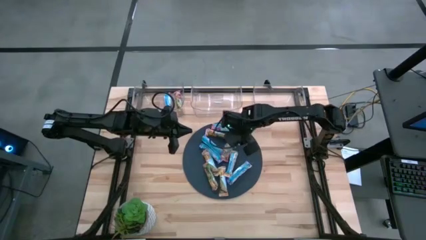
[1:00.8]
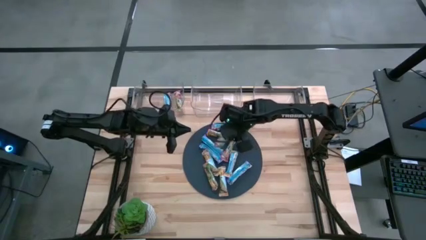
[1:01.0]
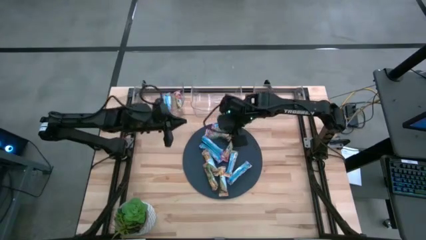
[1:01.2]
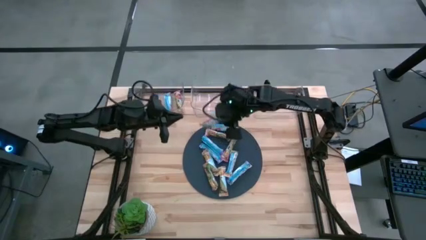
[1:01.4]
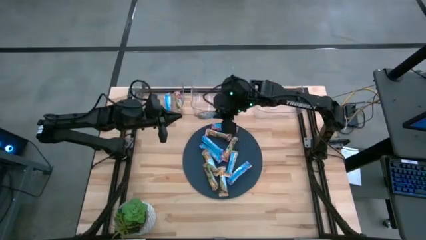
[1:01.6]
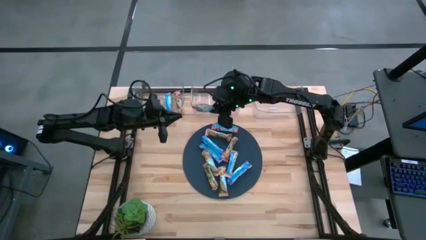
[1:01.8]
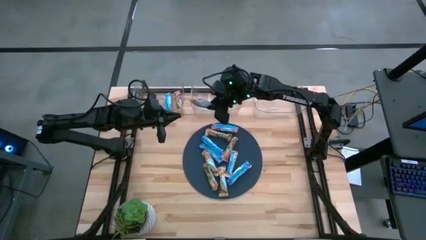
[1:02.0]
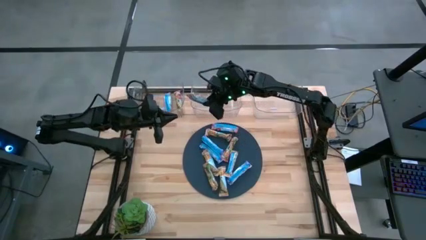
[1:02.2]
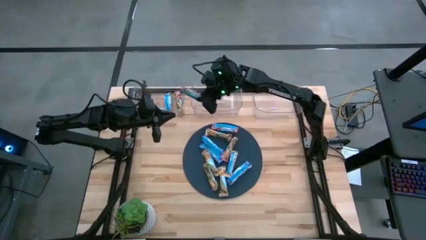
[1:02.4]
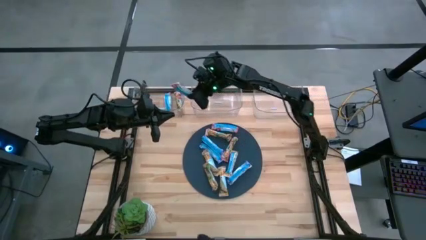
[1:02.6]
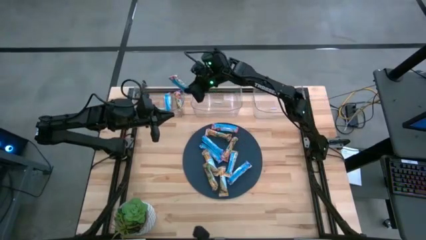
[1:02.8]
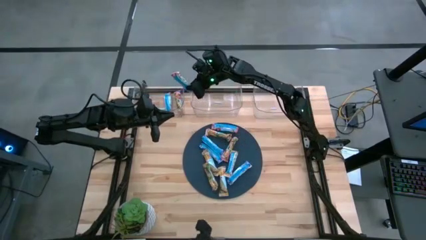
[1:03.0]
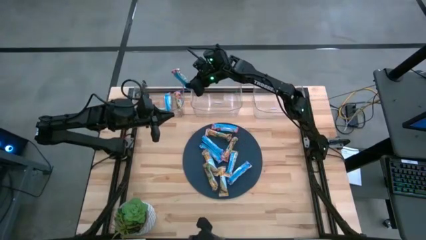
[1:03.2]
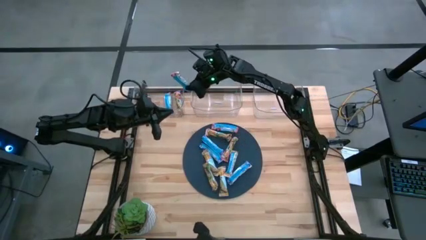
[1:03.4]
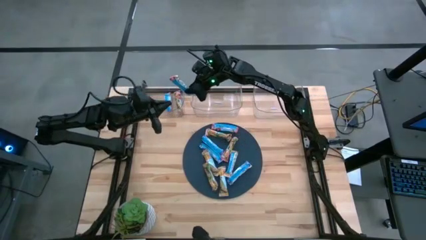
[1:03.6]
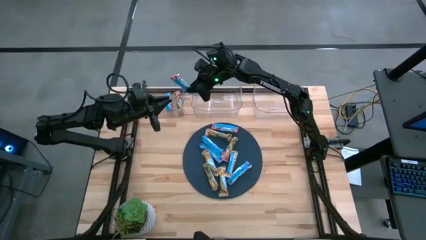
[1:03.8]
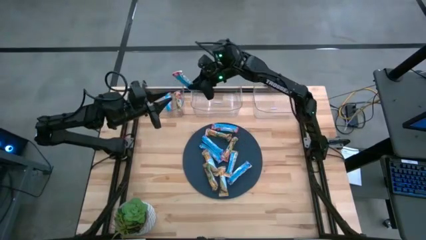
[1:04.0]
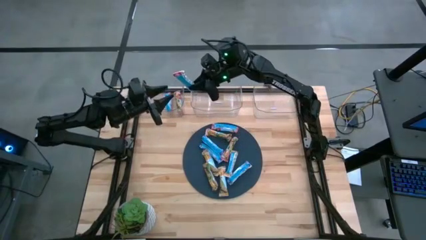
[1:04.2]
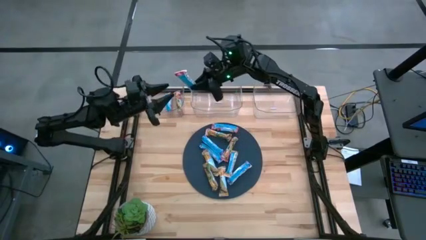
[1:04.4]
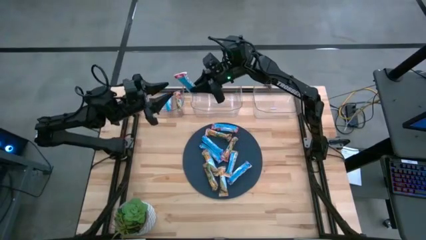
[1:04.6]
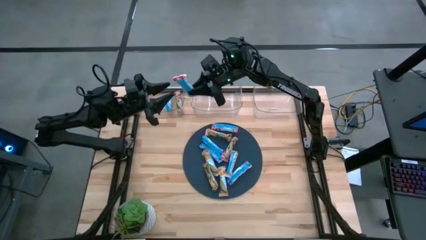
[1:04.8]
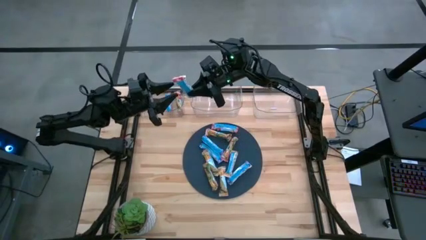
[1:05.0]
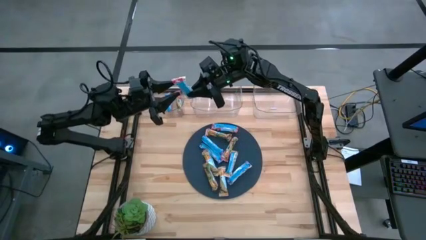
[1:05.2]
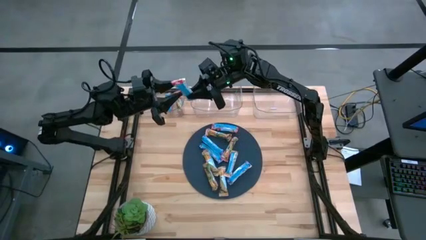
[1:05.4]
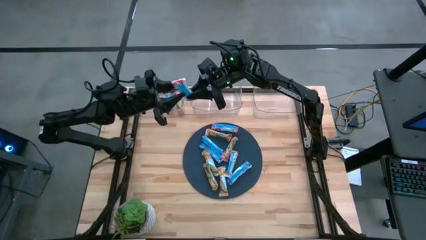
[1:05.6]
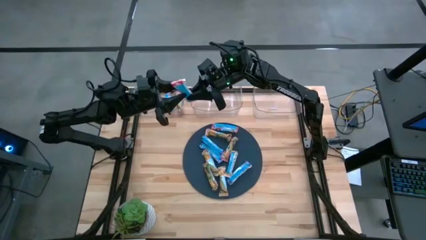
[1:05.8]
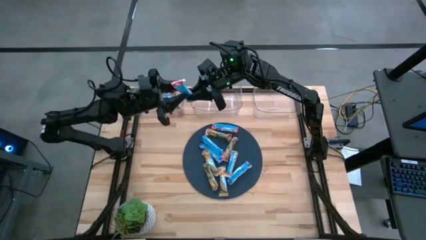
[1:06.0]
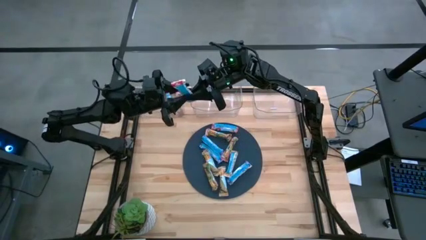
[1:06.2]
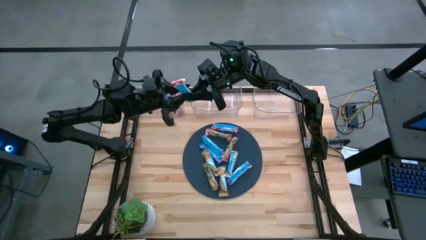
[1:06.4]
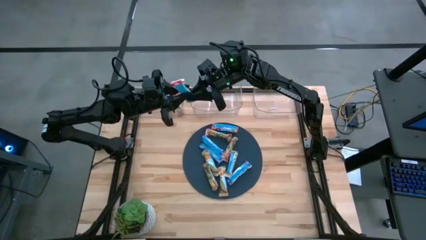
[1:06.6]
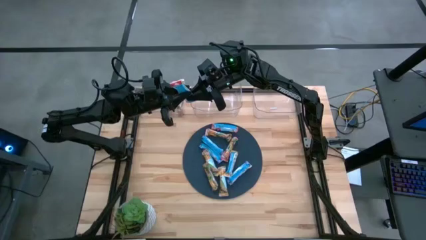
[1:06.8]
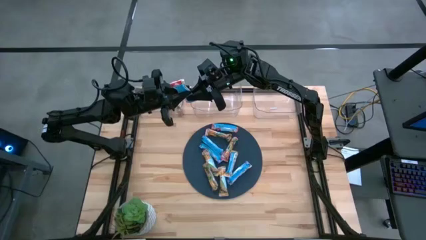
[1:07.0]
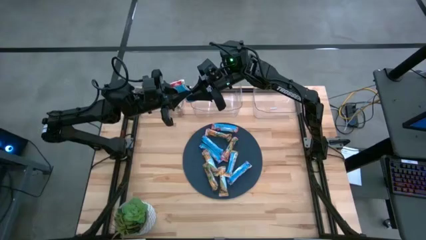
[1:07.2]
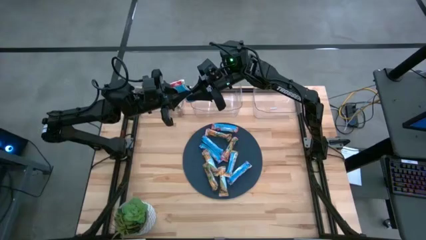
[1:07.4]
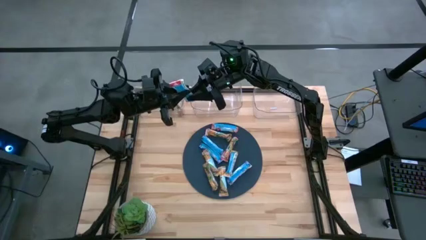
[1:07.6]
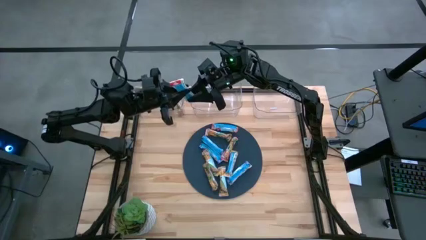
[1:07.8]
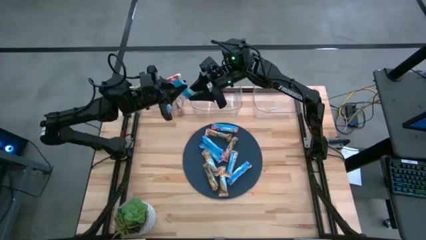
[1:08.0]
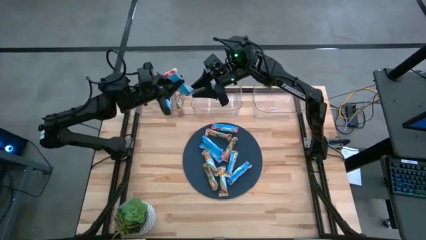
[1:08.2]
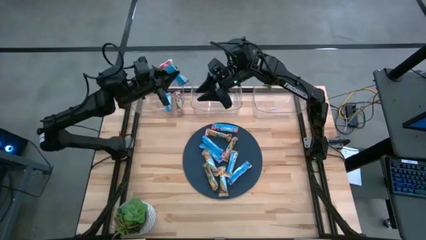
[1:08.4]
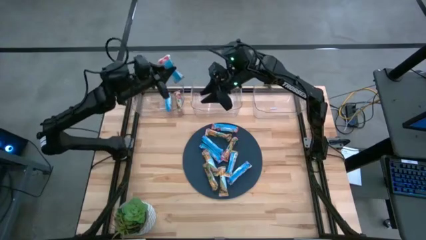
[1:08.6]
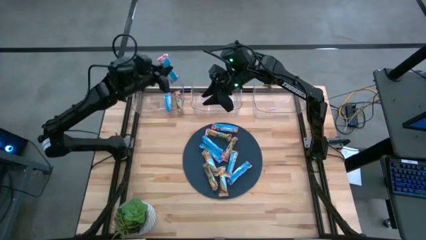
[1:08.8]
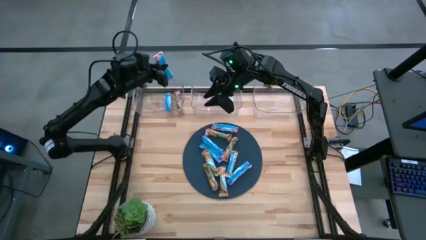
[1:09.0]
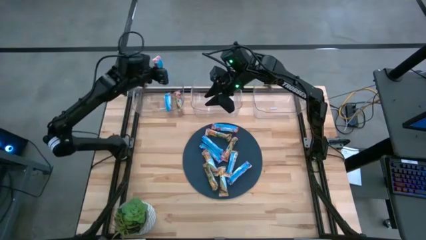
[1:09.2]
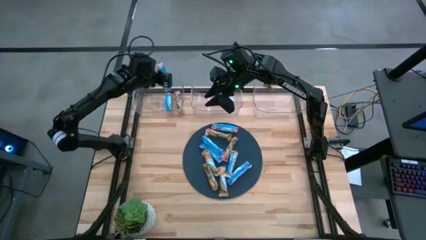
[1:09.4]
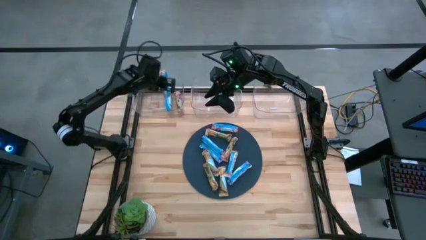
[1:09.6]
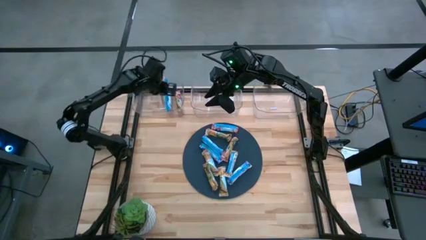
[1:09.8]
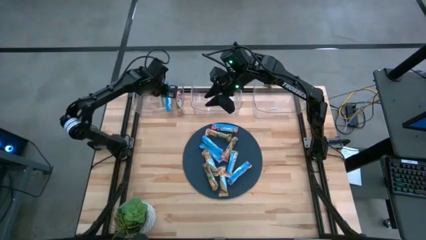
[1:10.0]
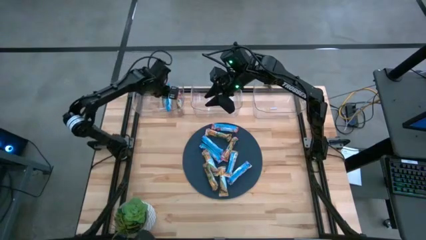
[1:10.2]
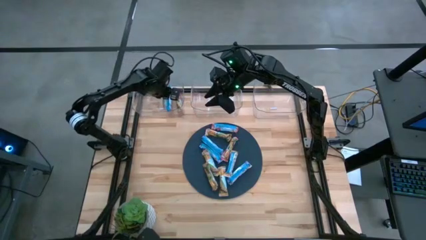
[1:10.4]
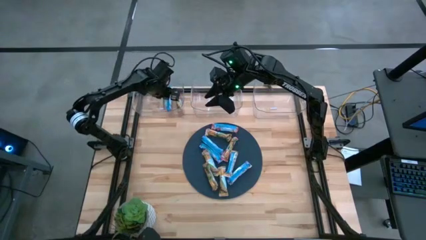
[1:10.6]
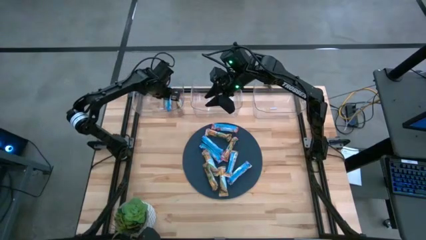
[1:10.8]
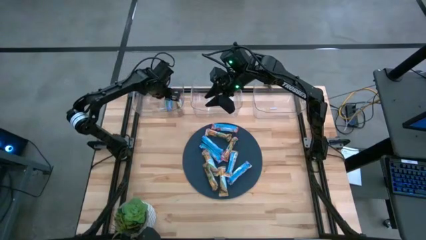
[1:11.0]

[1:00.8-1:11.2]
Task: Pick and place Granola Bars by type
Put the red granola bar into the left transparent bin
